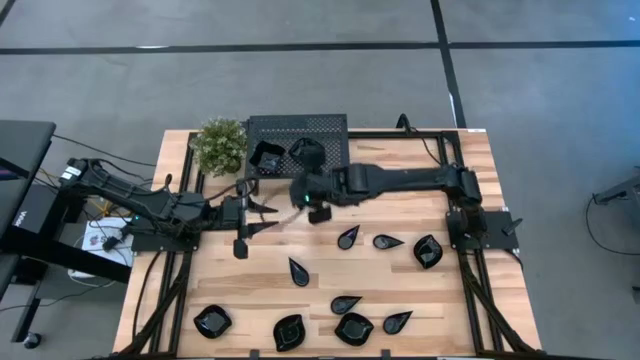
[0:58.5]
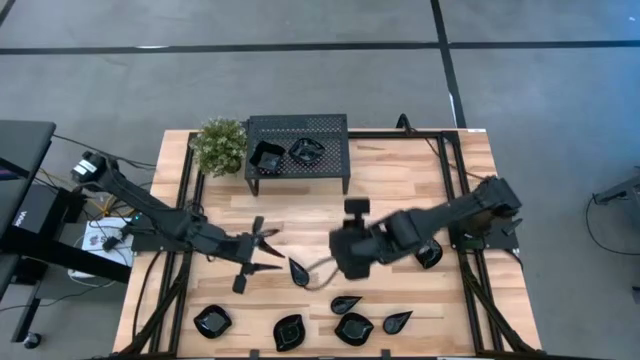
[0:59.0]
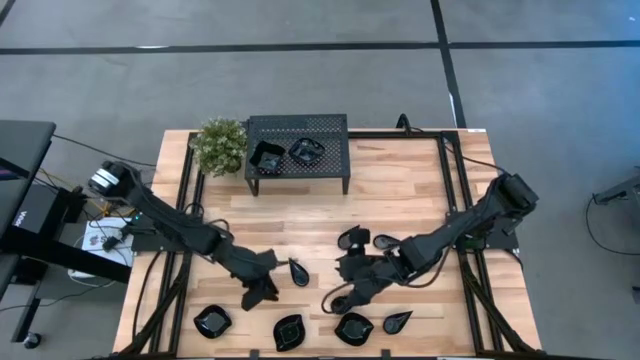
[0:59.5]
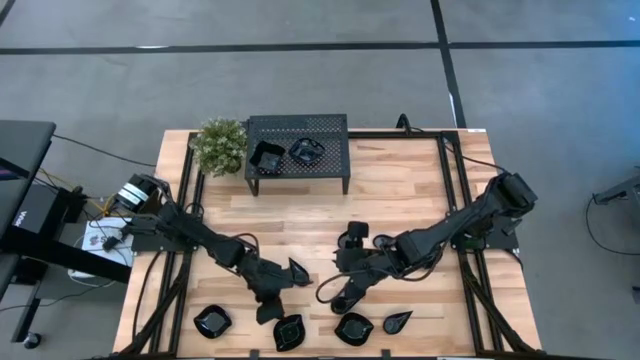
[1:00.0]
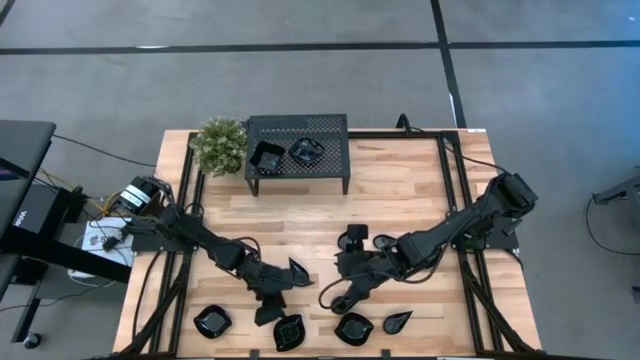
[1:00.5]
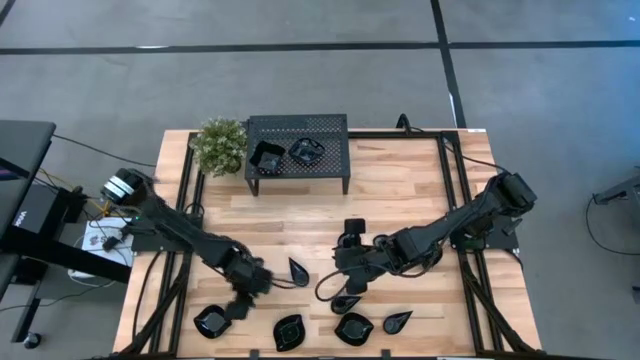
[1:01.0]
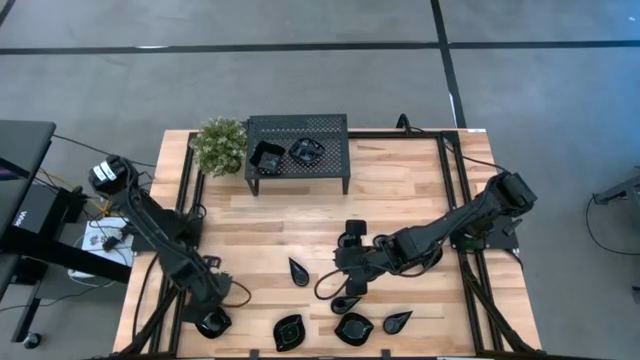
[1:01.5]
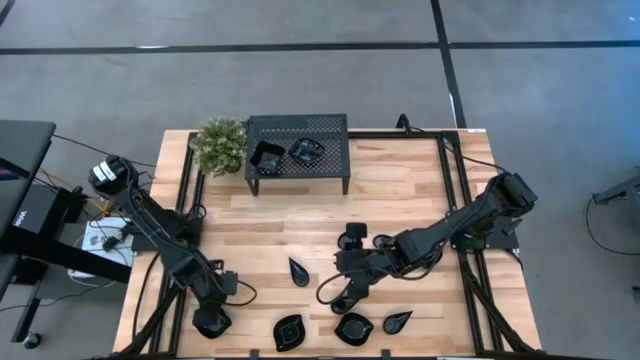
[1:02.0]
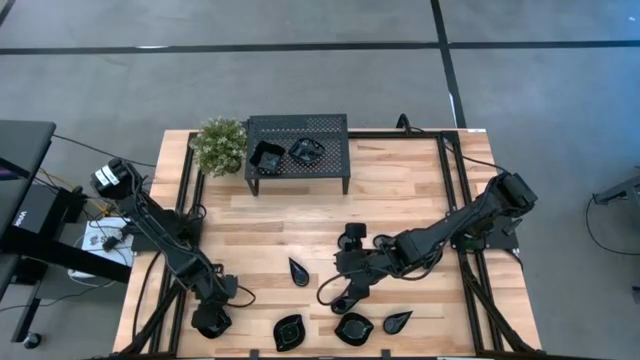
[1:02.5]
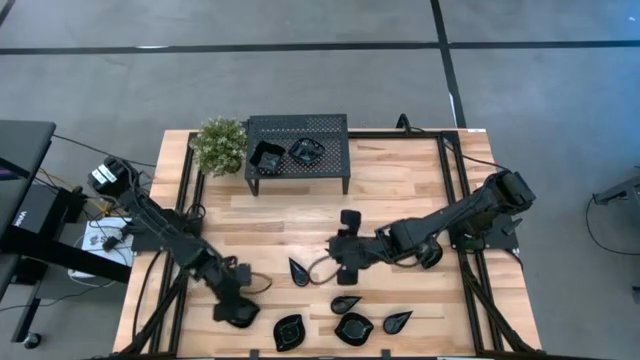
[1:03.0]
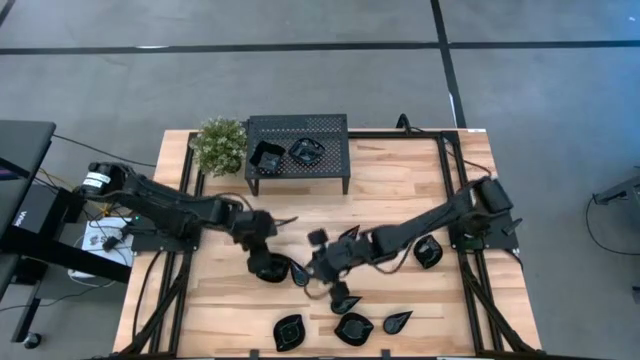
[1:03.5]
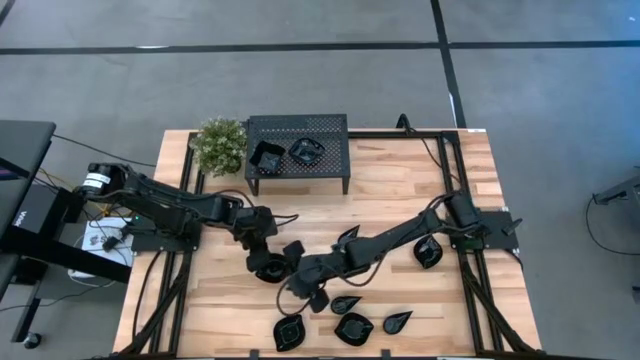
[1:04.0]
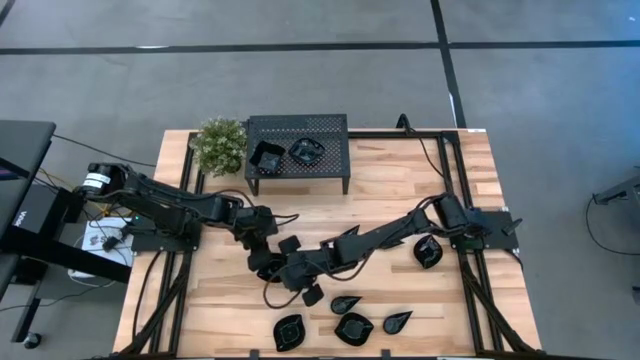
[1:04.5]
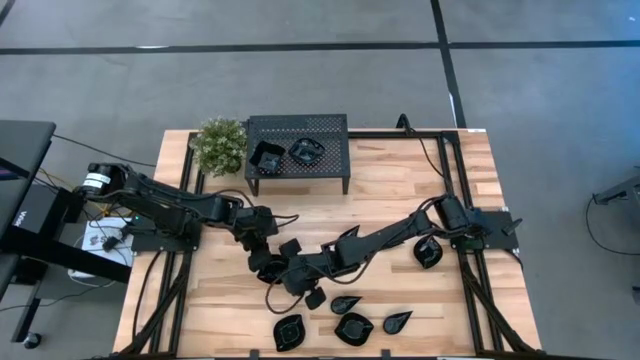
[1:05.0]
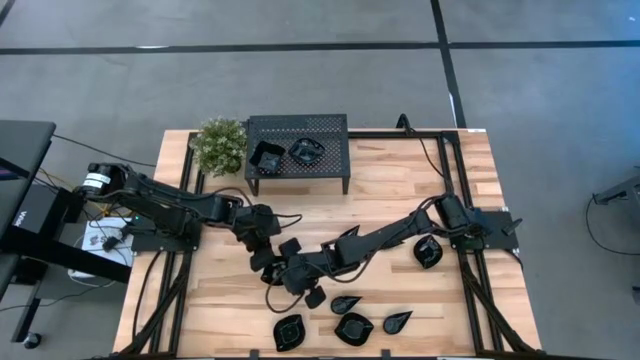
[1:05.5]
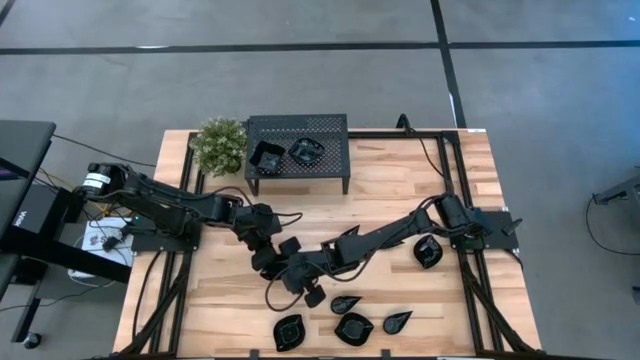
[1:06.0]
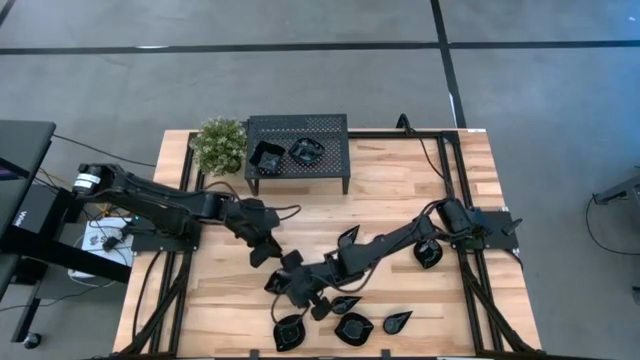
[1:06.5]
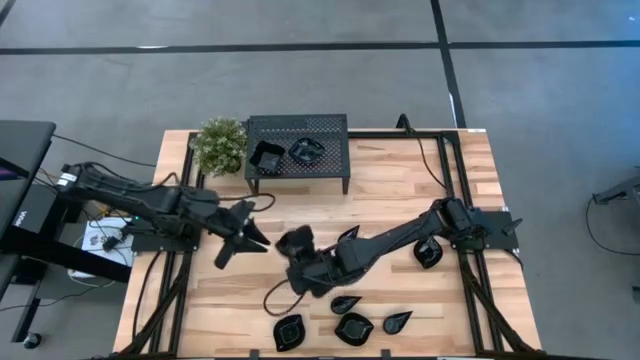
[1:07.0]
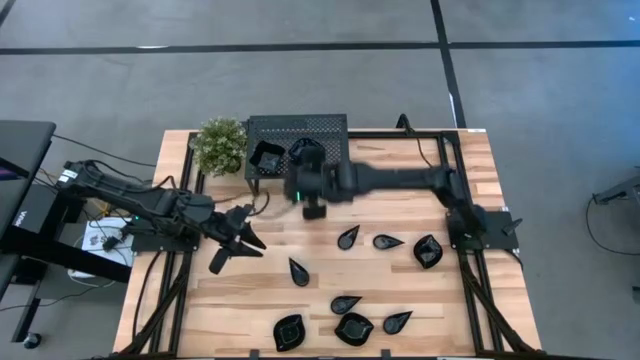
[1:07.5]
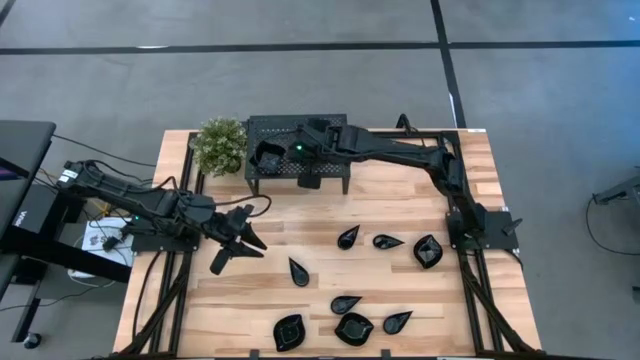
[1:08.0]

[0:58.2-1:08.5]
Task: Pick & Place Mini shaped plates
Stack the leaf shaped plate on top of the leaf shaped plate on the shelf

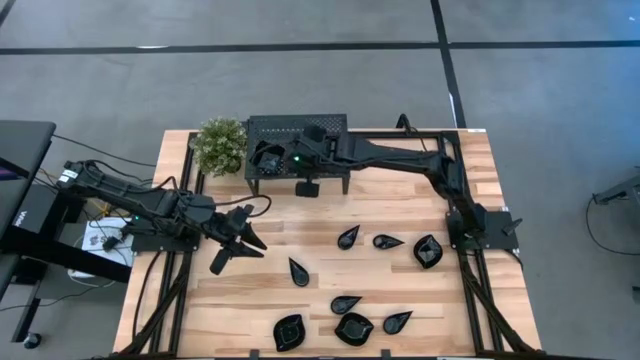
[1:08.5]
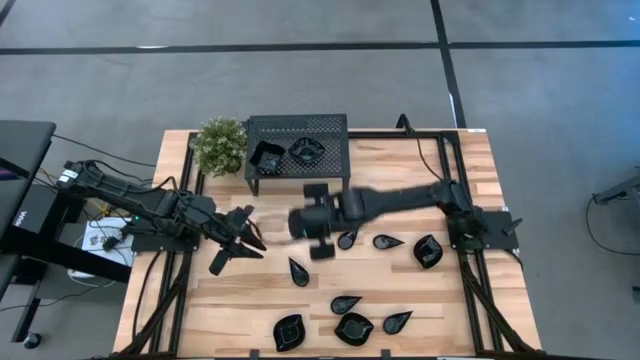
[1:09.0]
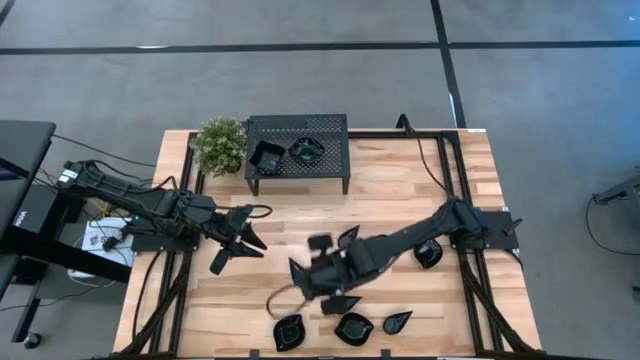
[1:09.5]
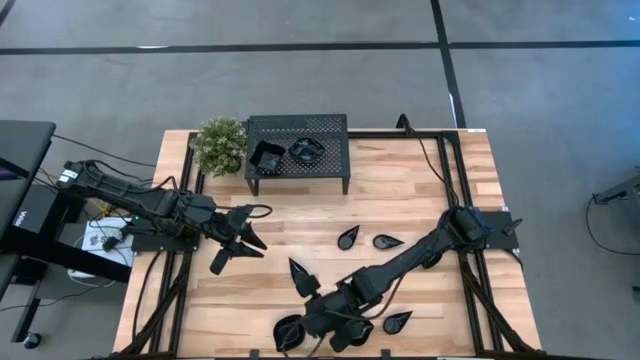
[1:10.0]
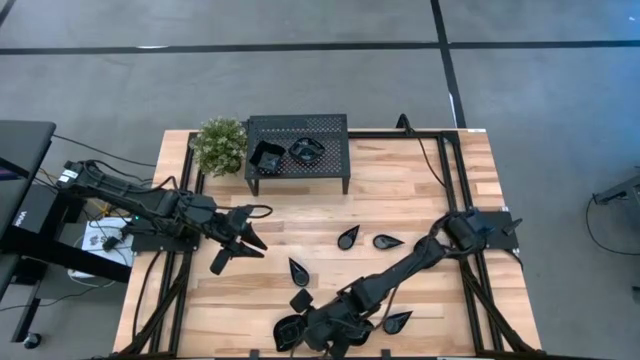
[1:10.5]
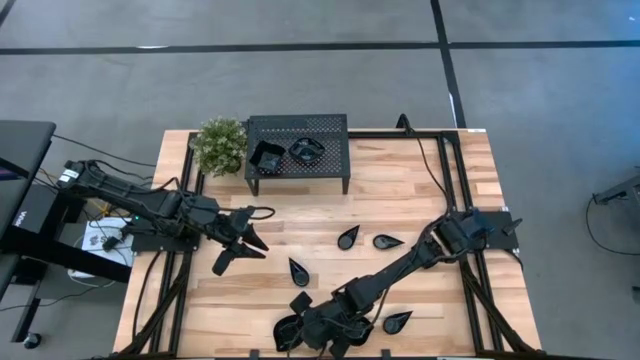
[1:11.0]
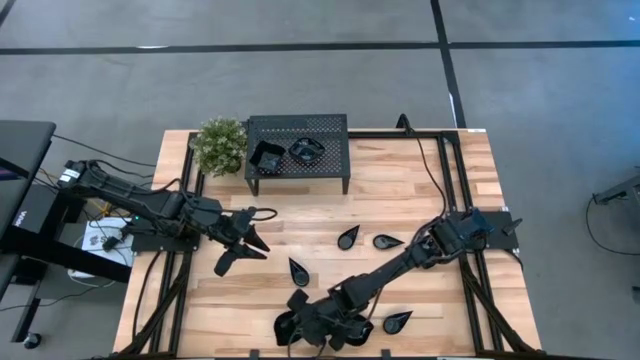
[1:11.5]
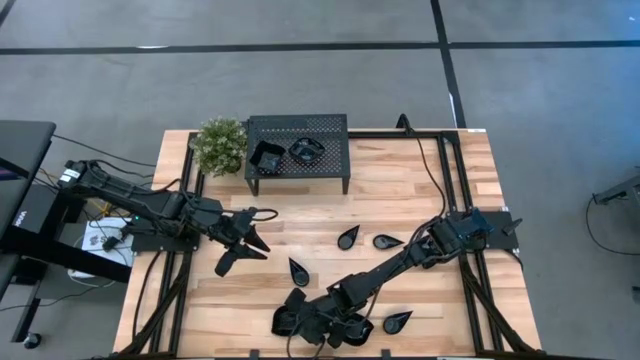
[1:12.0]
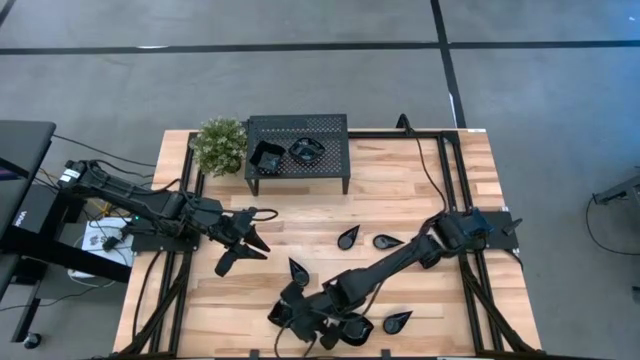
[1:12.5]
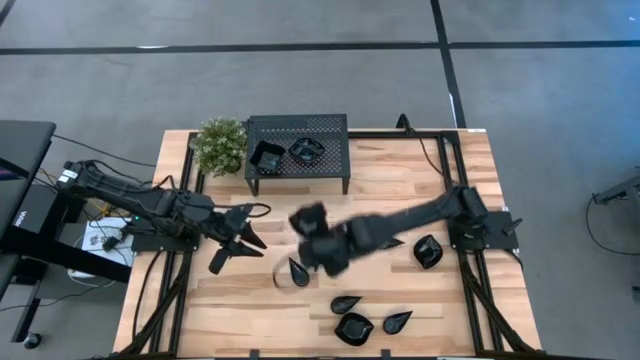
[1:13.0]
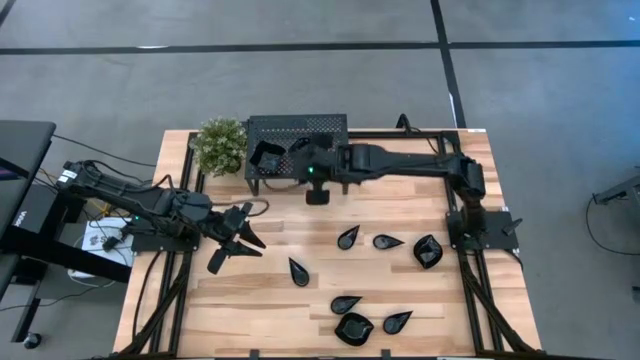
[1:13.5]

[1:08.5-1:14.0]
Stack the leaf shaped plate on top of the leaf shaped plate on the shelf

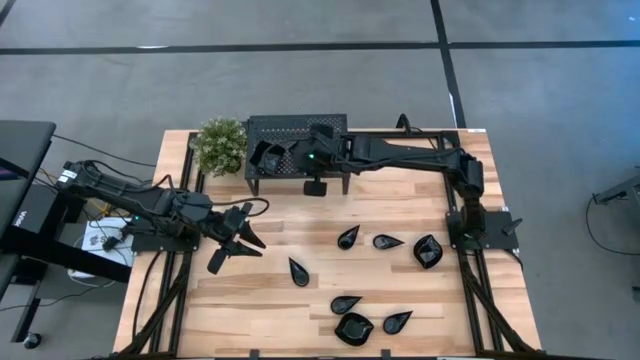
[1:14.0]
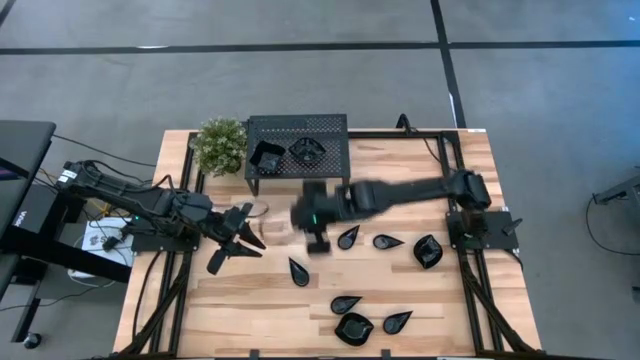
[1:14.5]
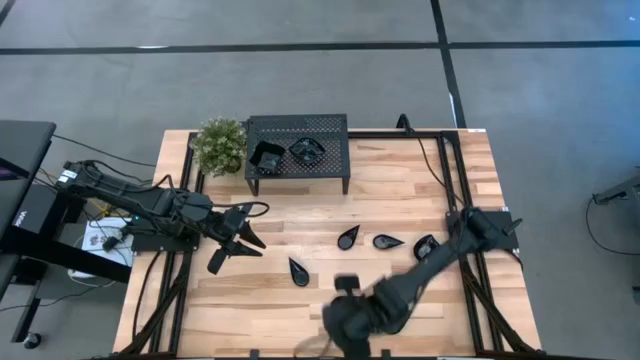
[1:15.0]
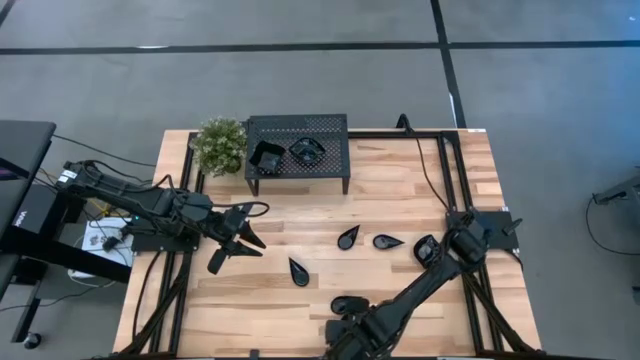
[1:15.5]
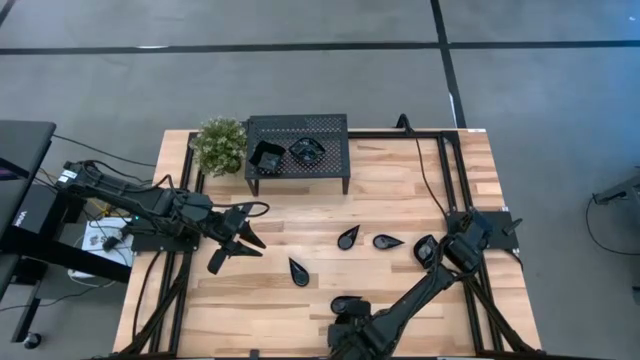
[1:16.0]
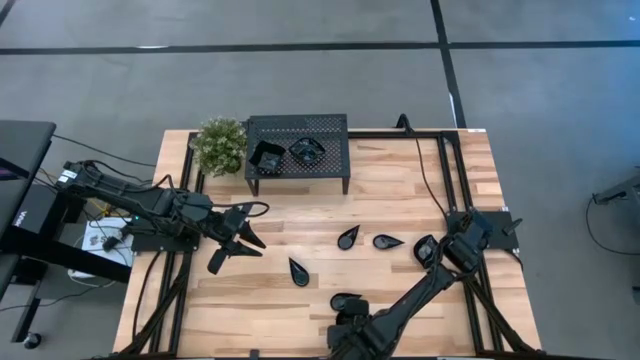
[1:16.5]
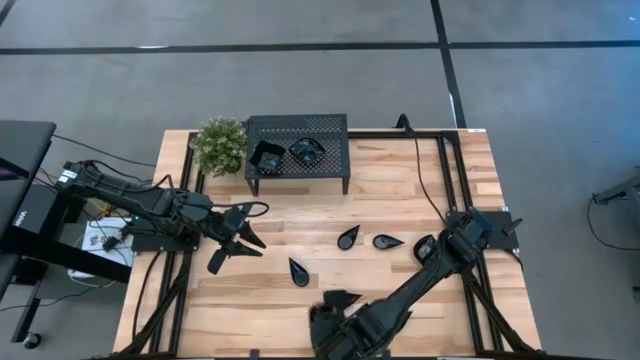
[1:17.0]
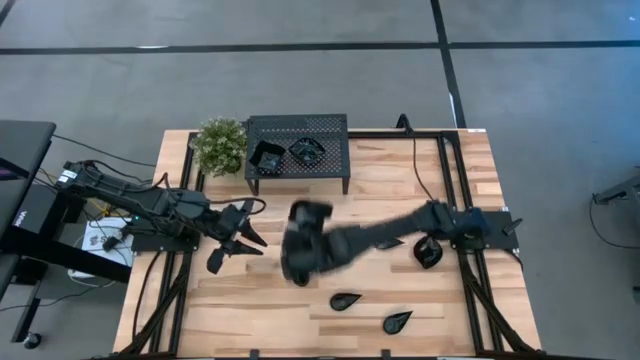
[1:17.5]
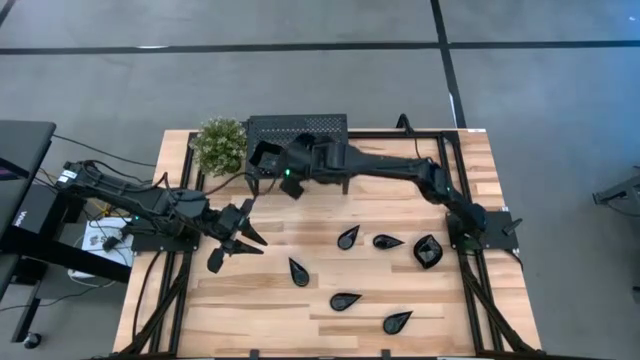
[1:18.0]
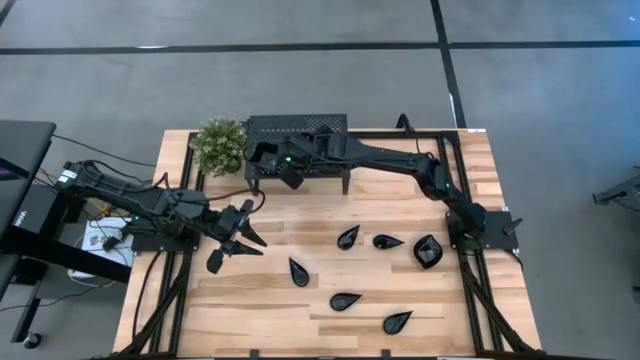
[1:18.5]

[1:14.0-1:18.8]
Stack the leaf shaped plate on top of the leaf shaped plate on the shelf

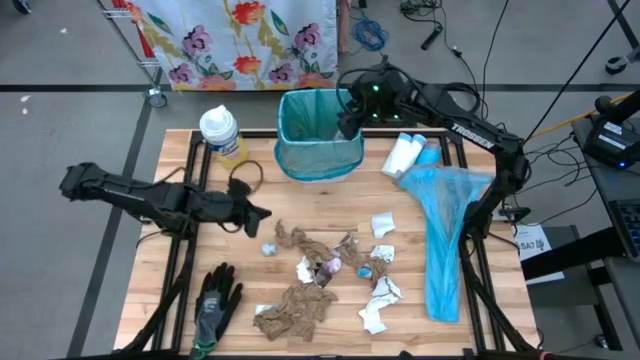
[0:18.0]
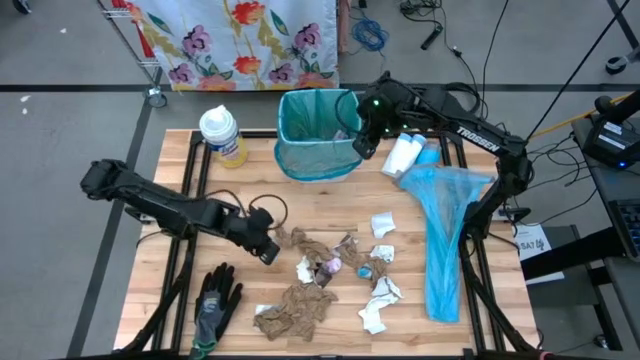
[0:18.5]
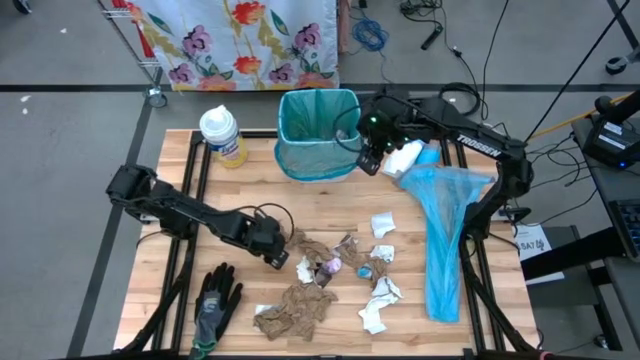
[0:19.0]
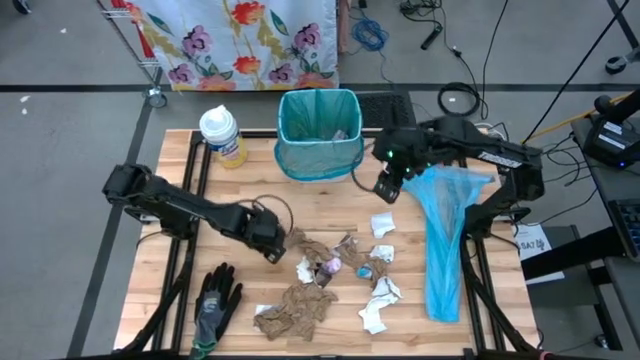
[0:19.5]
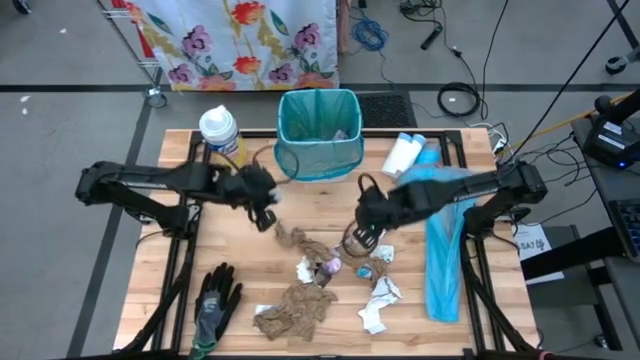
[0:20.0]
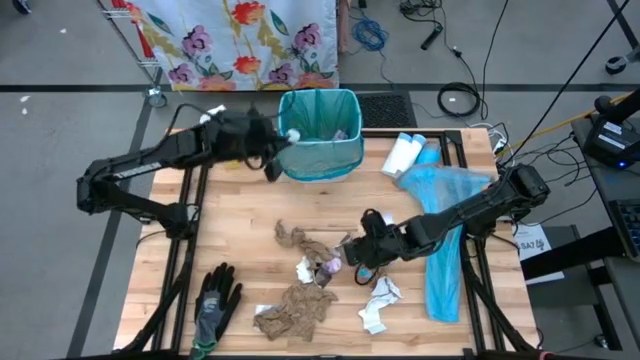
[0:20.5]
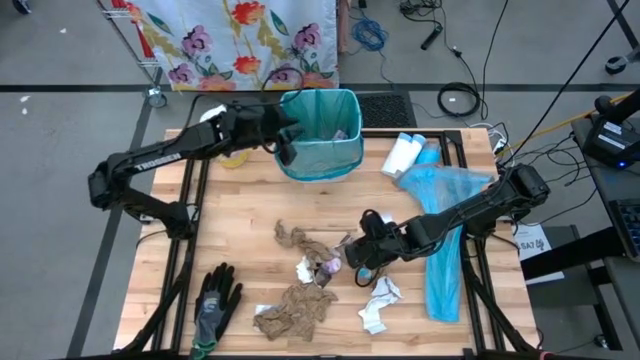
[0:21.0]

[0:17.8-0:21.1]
Task: place trash/remove bag and relplace
Put the white bag into the white trash bin
